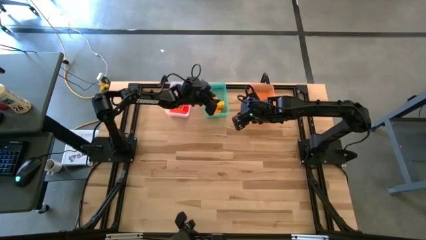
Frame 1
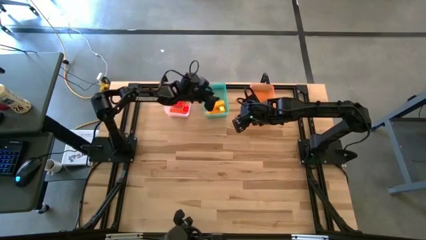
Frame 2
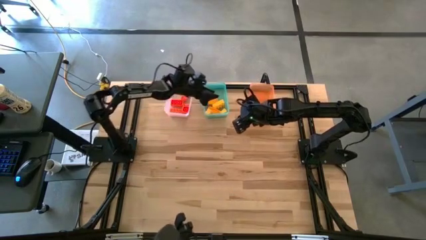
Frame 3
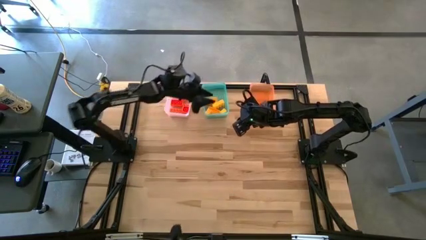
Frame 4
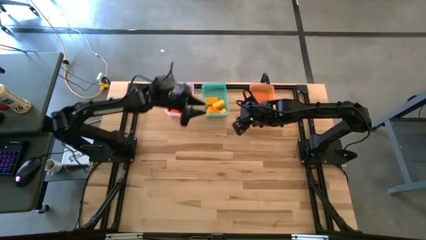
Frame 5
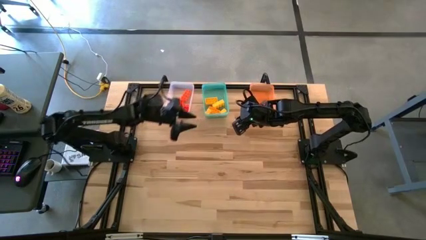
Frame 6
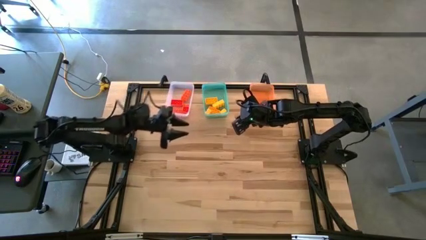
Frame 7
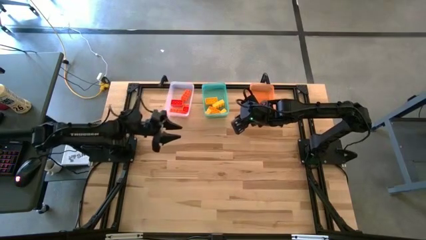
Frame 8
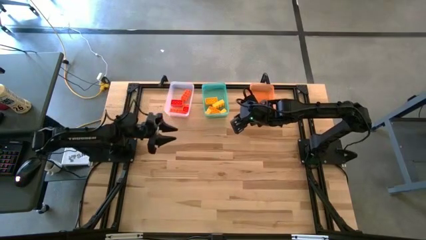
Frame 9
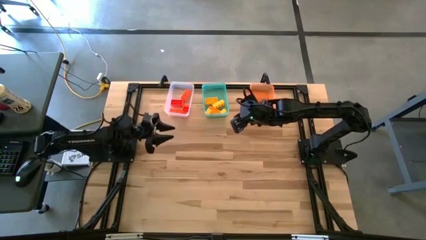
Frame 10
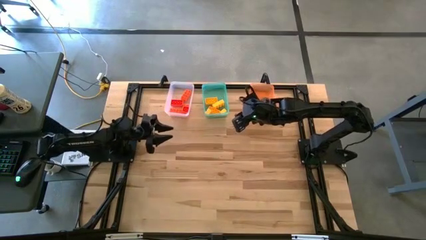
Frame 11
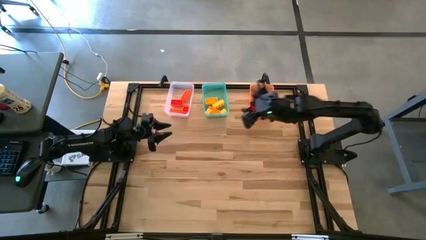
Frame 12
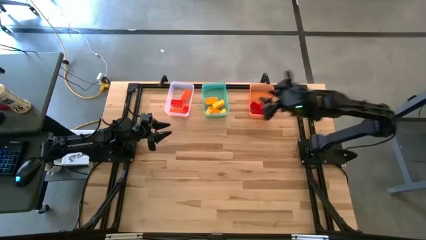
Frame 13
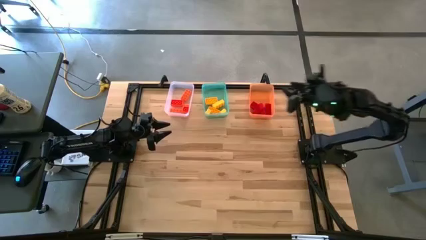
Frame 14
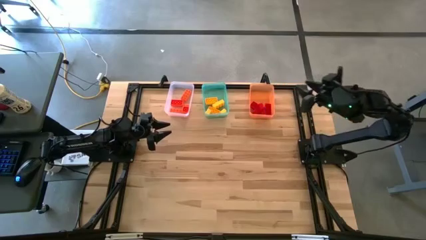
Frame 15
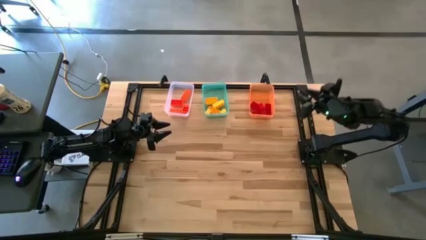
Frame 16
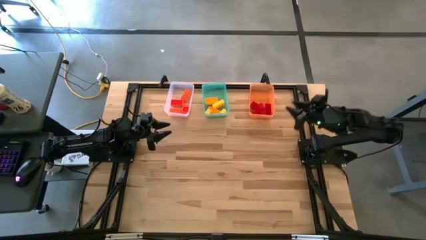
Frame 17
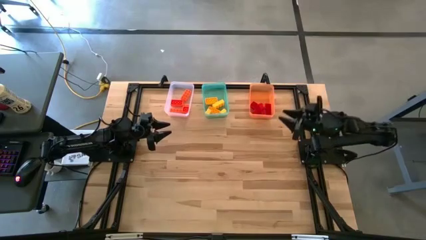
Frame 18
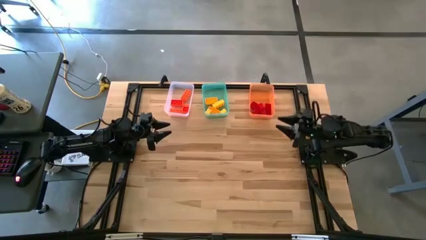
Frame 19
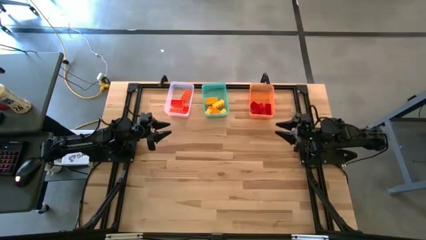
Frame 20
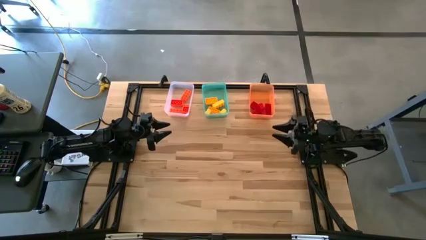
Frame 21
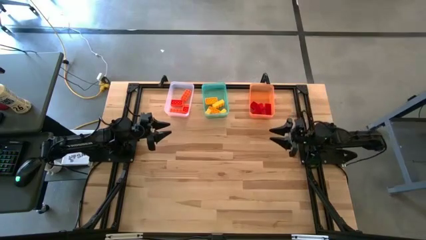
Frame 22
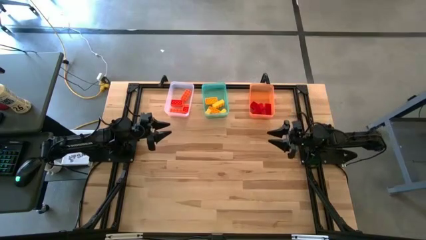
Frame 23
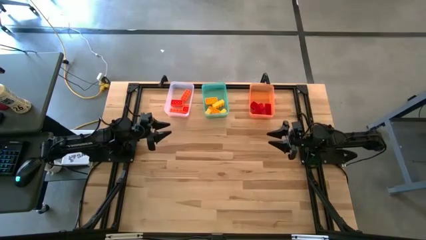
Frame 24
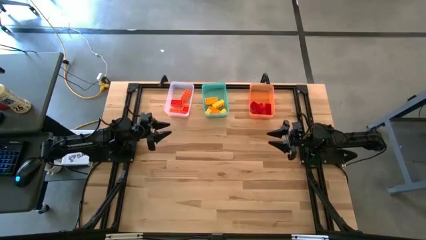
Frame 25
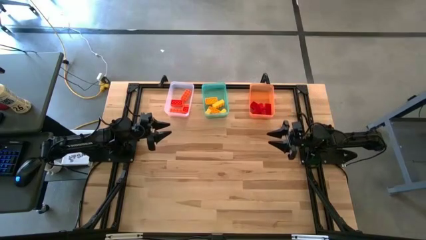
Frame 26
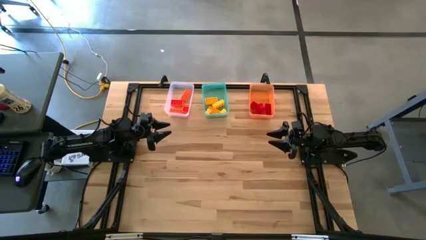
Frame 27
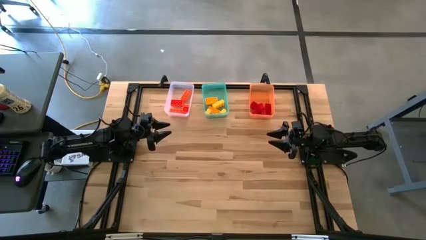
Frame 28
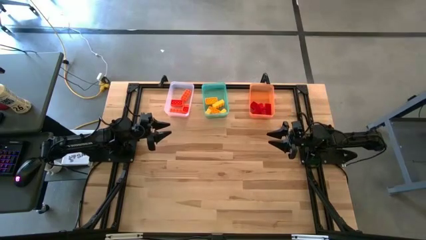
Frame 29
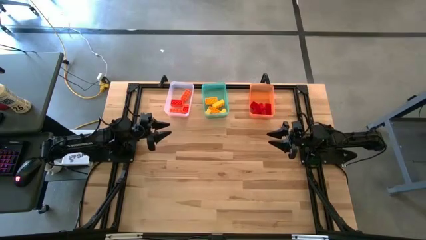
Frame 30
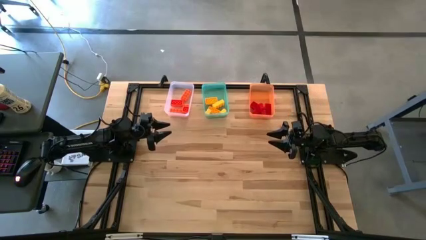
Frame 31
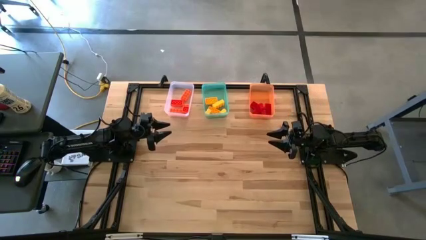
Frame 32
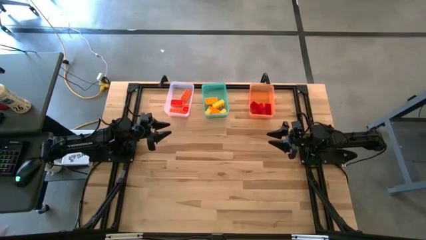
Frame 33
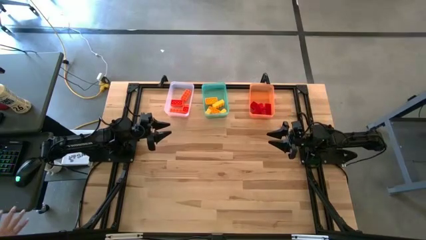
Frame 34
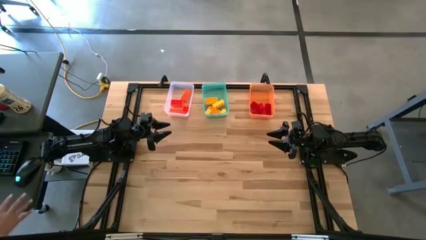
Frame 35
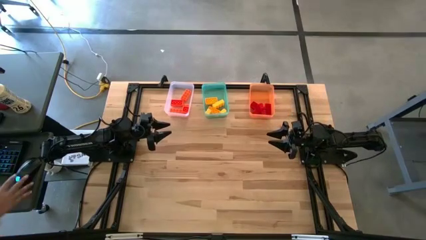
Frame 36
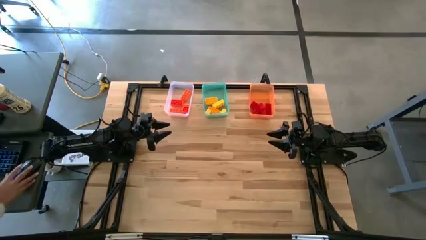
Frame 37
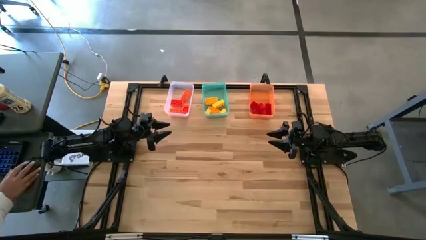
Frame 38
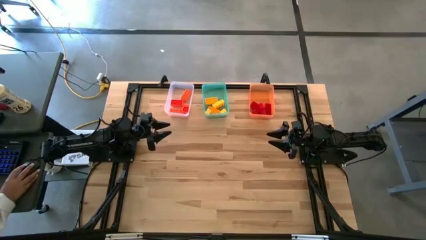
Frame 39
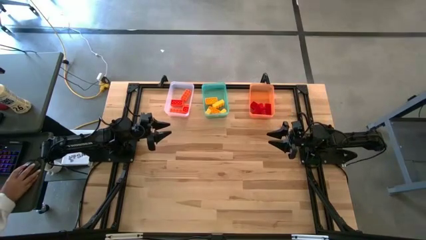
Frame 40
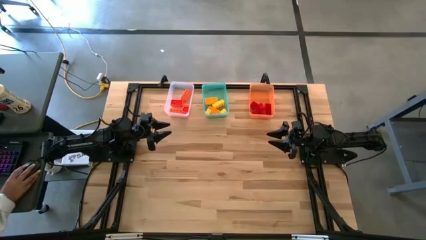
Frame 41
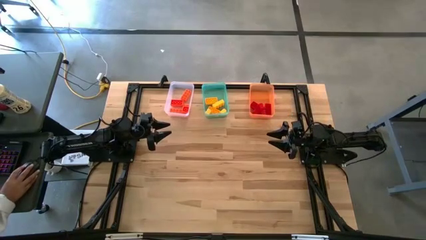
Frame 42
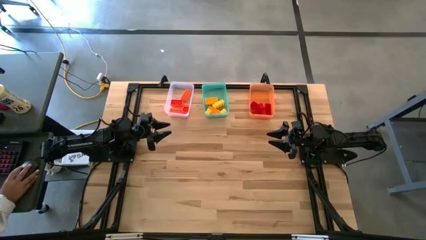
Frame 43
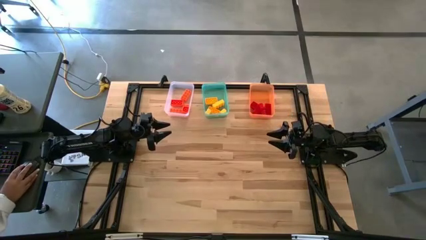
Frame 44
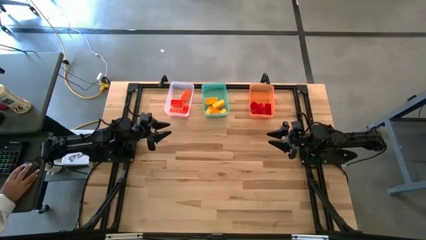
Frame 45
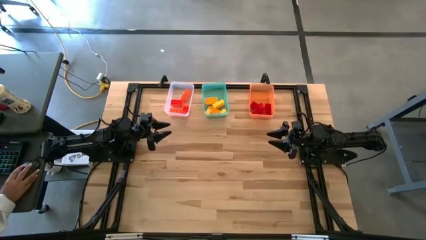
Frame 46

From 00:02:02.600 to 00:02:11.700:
Task: Sort & place blocks by color
Return to Home Position

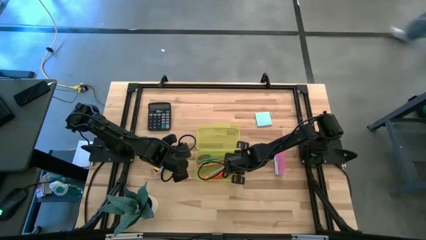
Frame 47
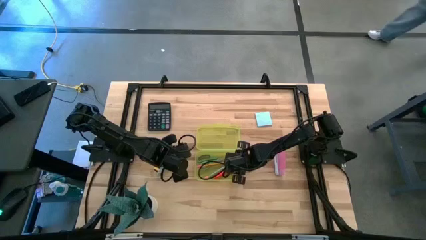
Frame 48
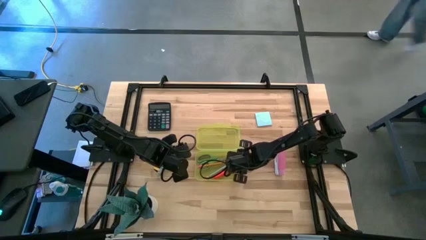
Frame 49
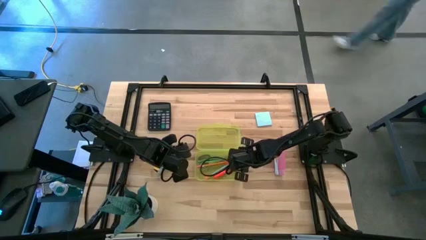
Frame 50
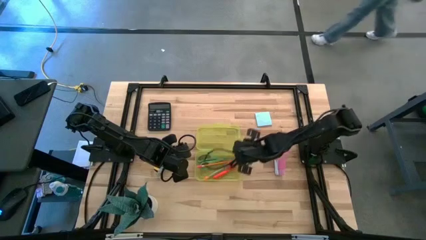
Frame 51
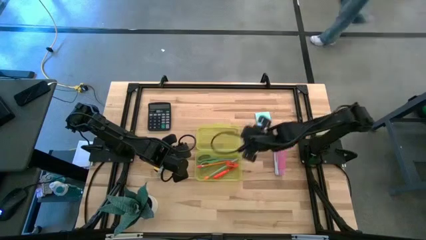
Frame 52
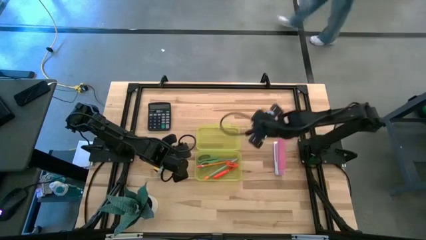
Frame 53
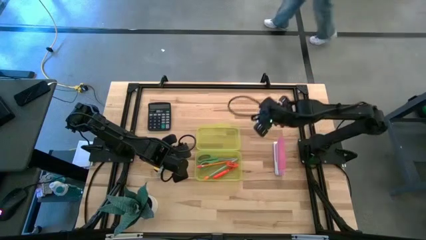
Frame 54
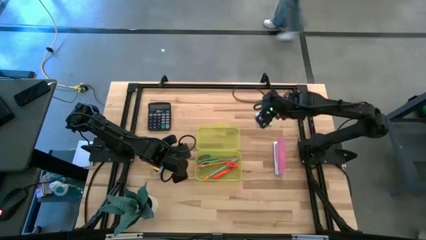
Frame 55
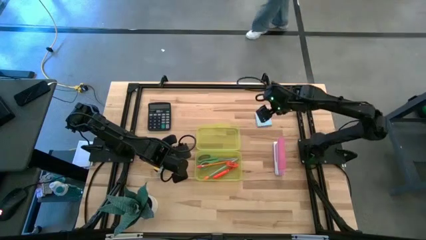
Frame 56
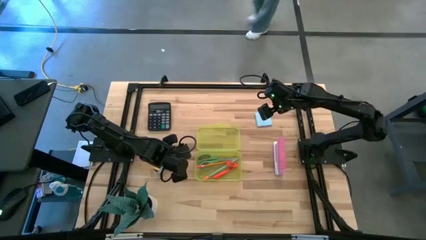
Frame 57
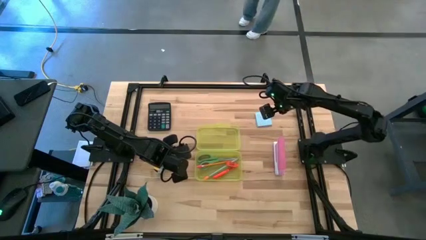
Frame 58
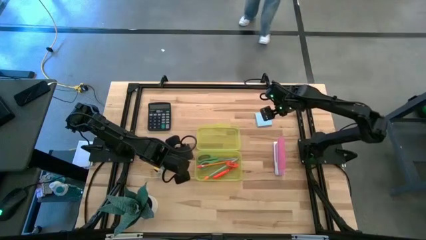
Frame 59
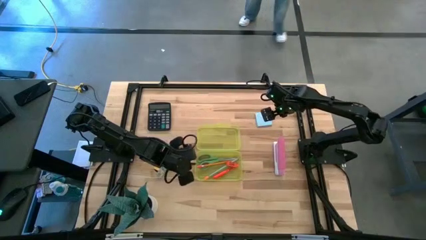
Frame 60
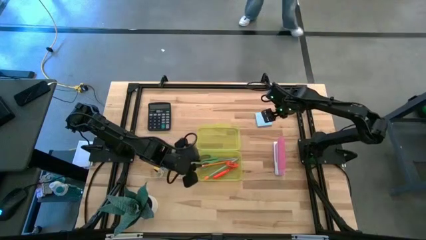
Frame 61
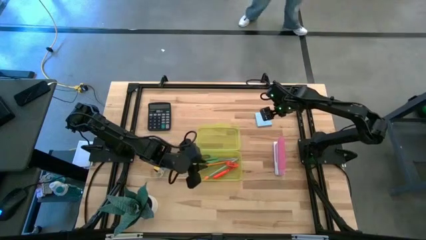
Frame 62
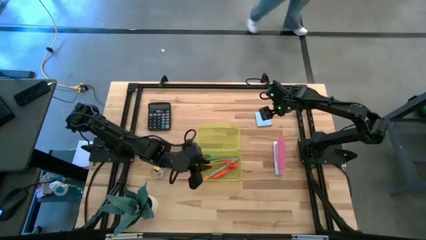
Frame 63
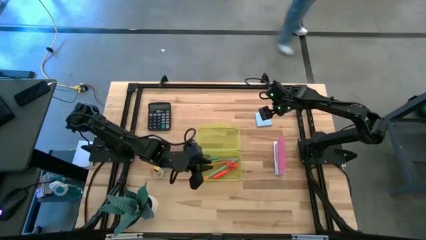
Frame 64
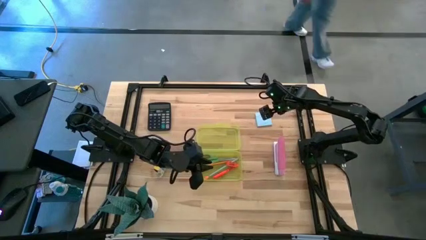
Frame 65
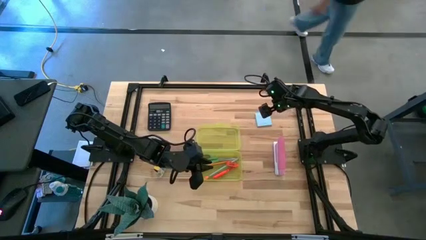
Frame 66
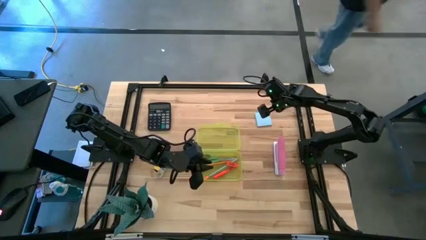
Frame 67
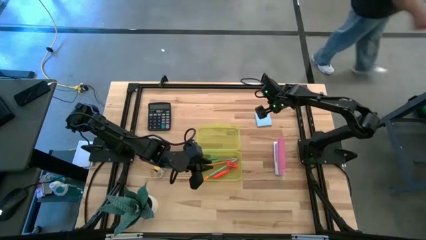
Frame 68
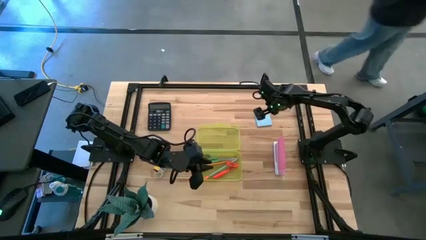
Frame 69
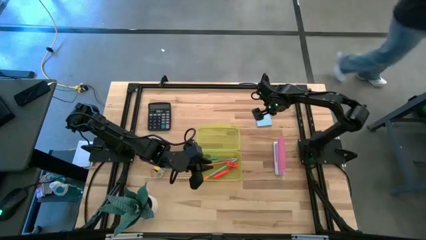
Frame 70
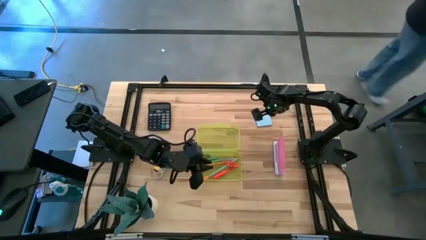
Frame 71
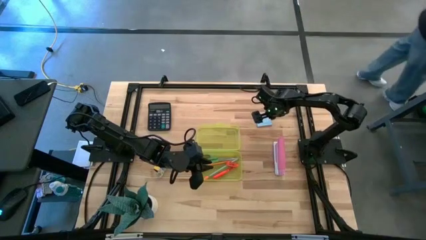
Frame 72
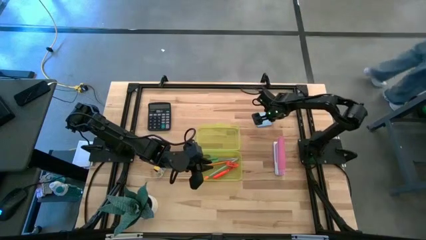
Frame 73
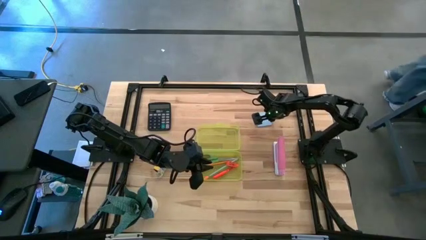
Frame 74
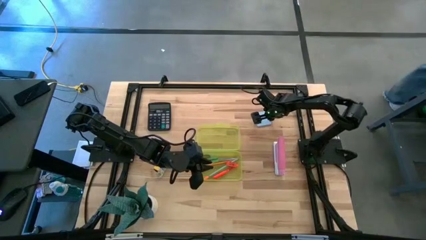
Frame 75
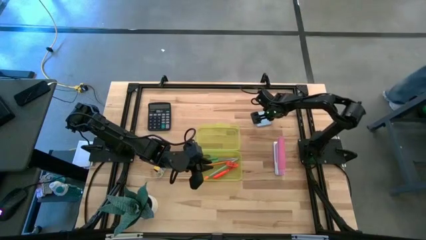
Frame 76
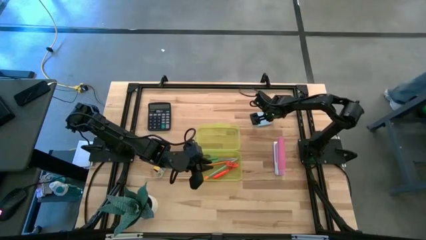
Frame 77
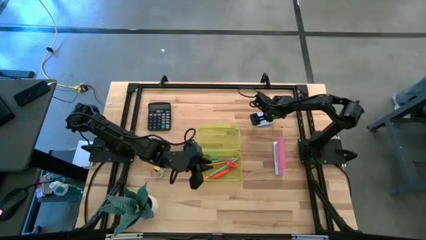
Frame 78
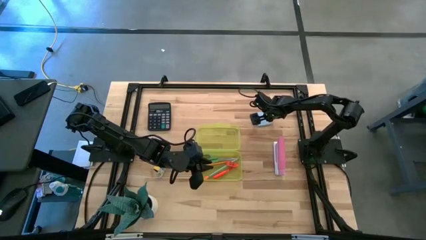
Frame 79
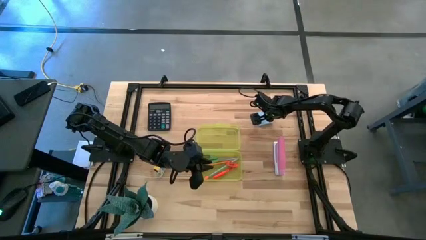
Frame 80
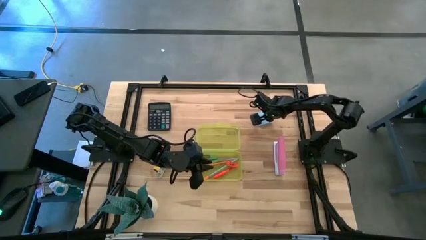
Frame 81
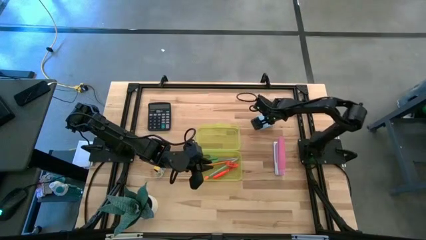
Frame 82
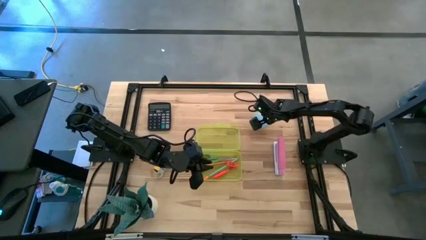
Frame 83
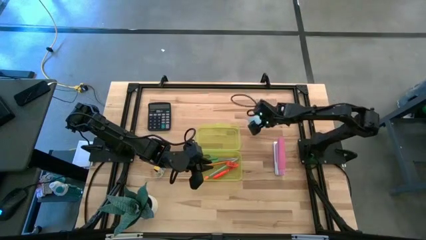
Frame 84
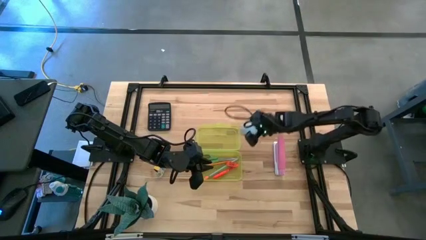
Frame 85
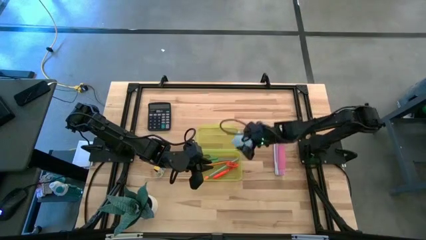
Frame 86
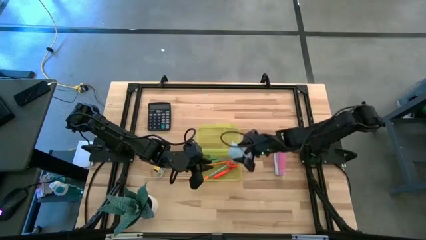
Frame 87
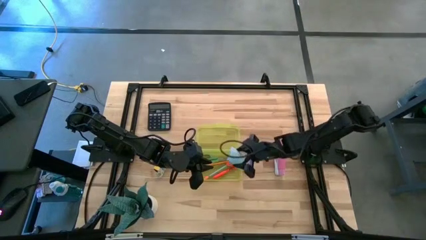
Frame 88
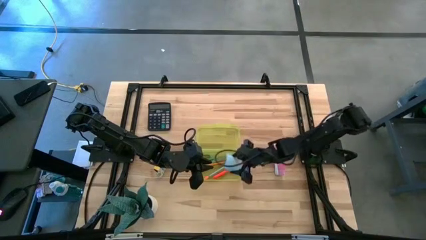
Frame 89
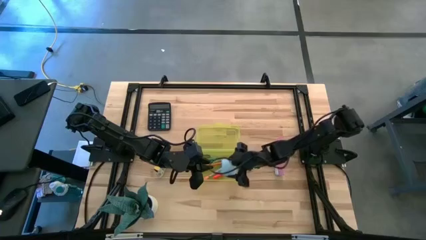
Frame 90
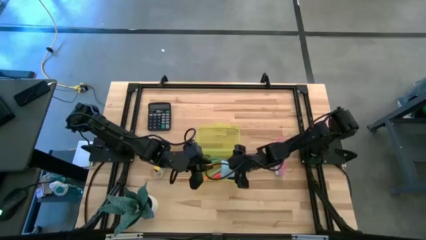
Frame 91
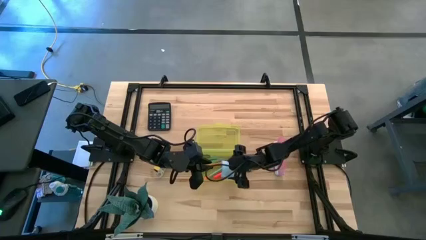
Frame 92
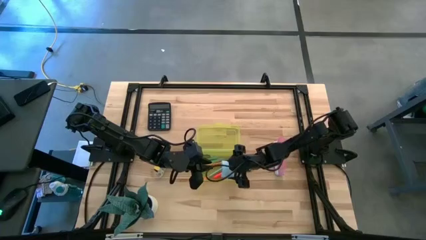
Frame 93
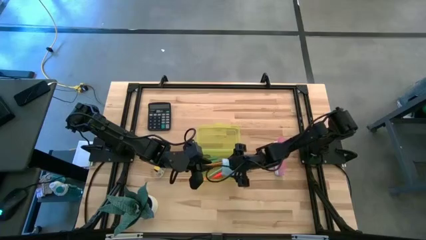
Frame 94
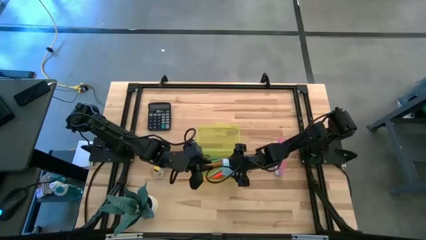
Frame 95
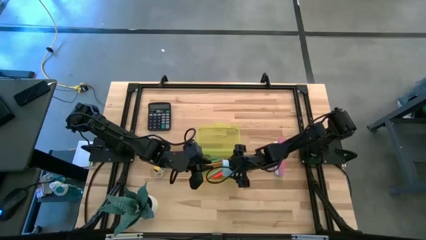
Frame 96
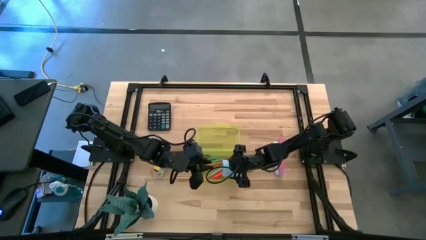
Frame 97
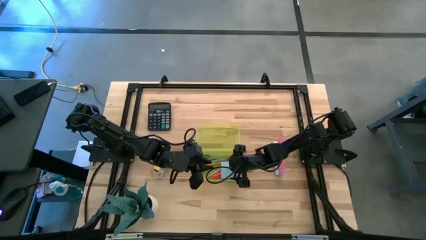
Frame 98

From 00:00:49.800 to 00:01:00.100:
Task: Pack school essentials
Put the blue sticky notes into the yellow supply box
